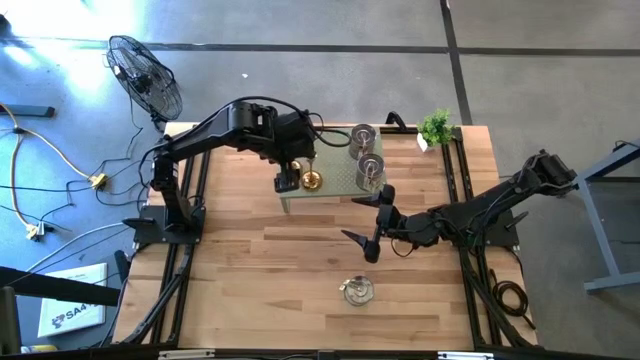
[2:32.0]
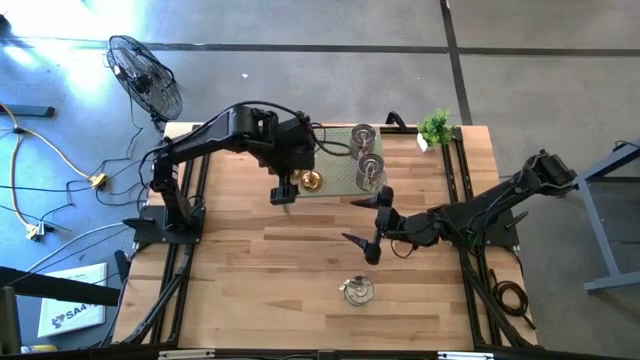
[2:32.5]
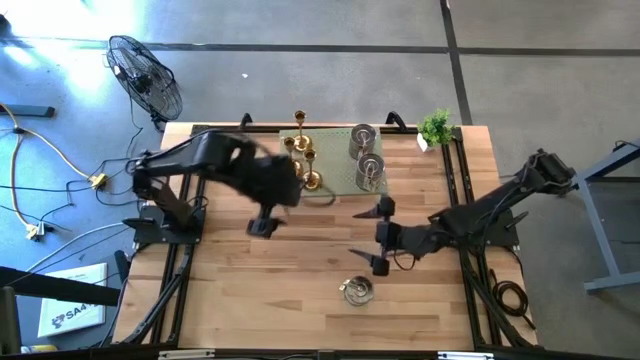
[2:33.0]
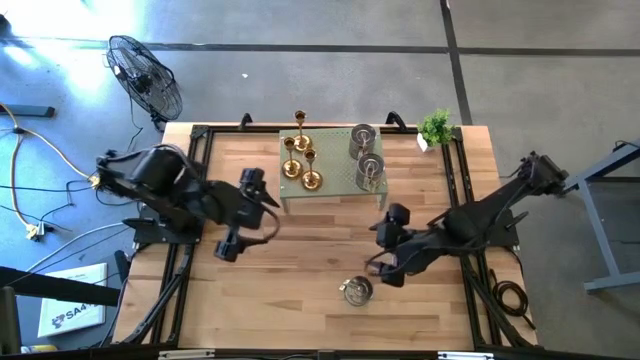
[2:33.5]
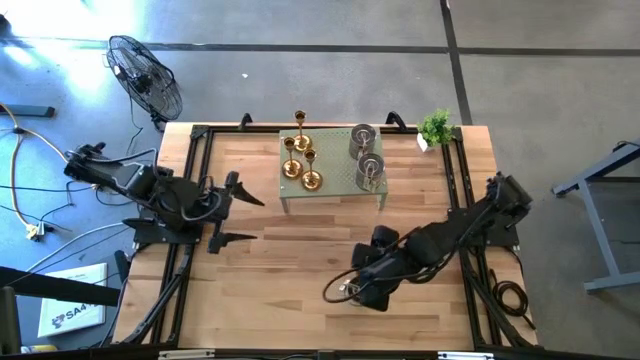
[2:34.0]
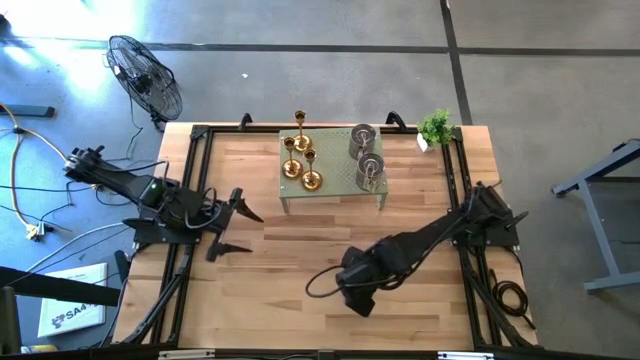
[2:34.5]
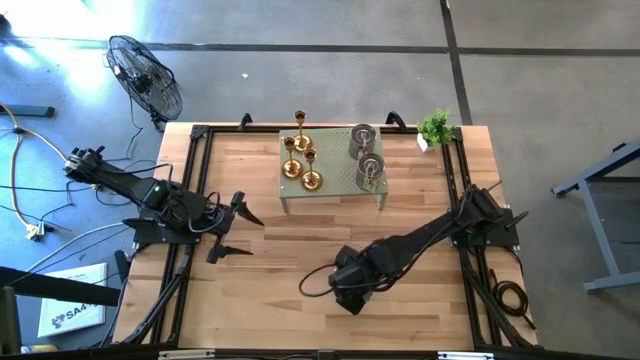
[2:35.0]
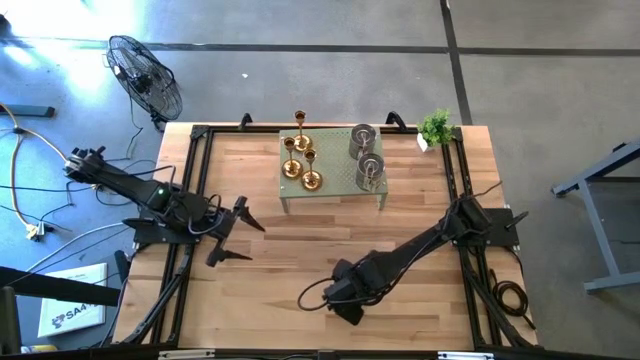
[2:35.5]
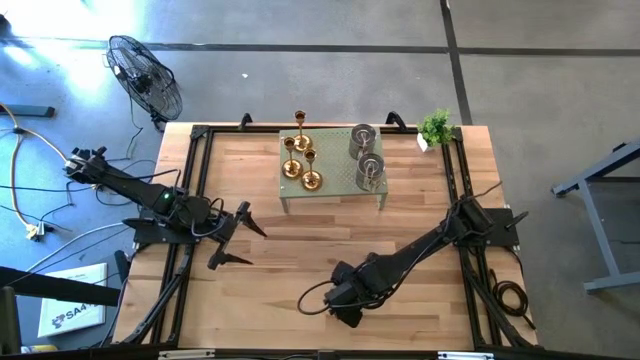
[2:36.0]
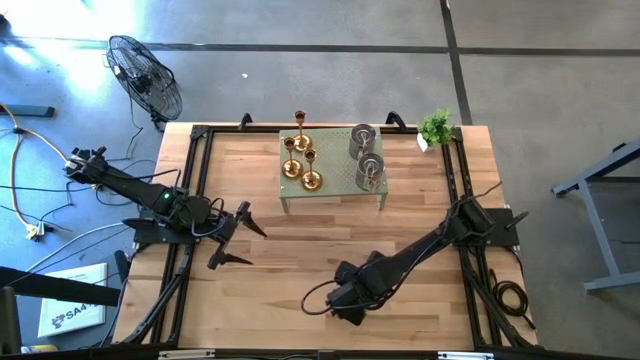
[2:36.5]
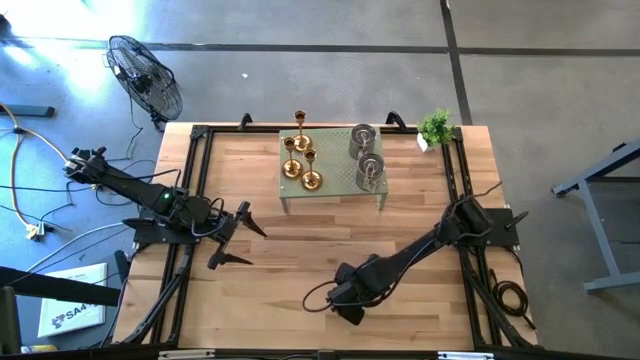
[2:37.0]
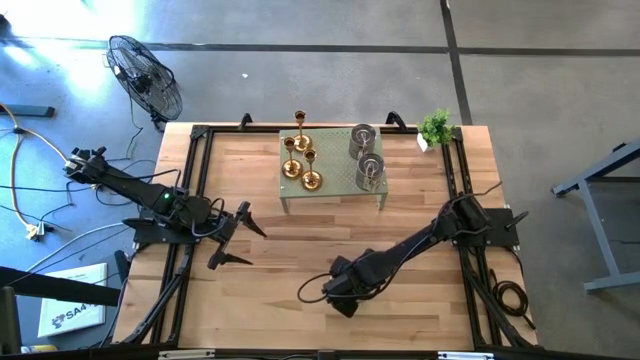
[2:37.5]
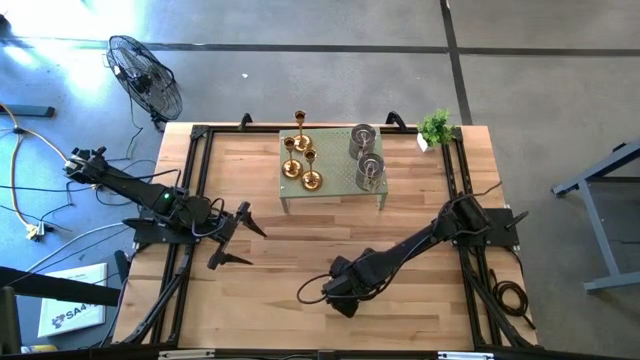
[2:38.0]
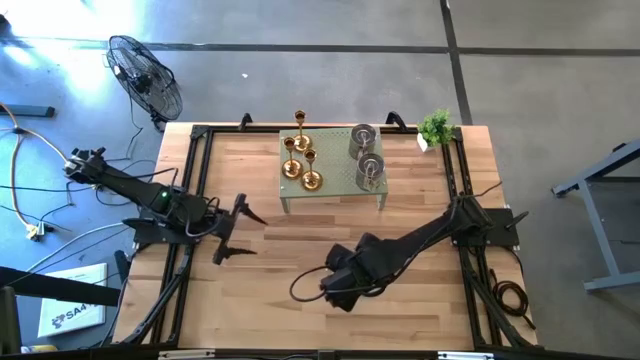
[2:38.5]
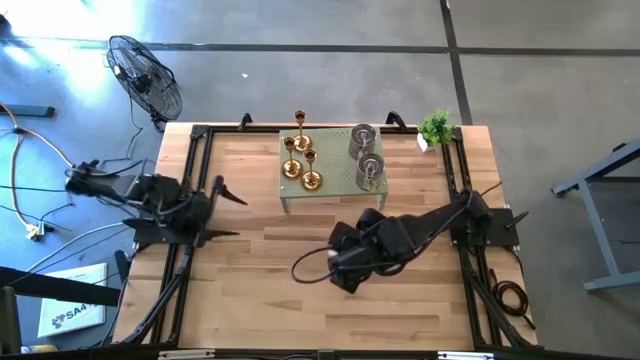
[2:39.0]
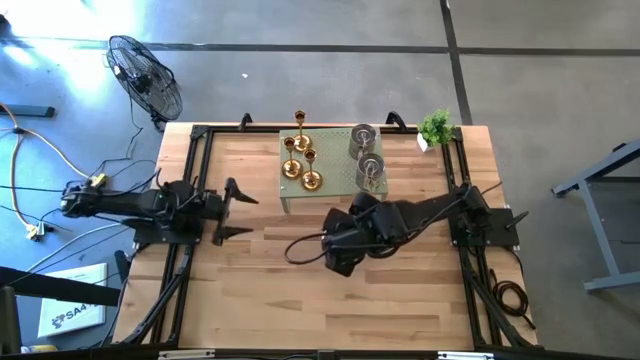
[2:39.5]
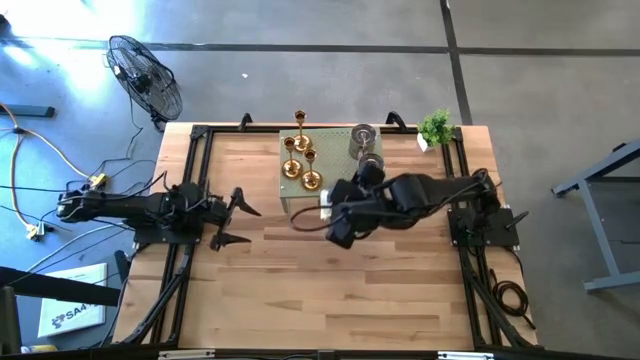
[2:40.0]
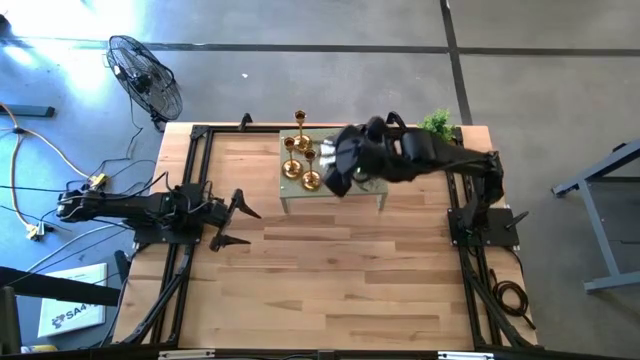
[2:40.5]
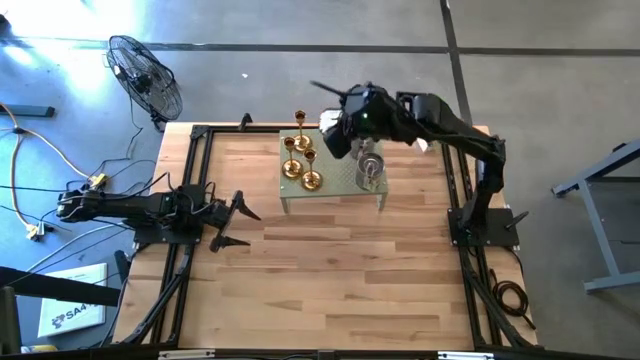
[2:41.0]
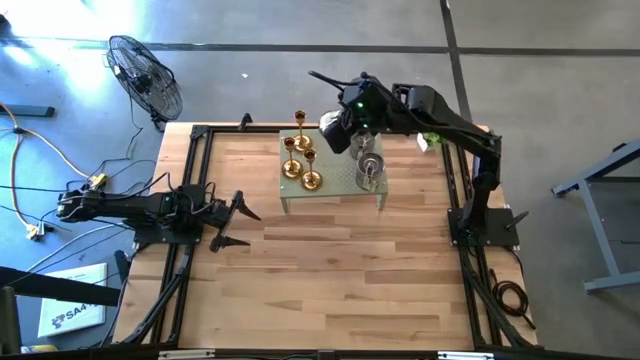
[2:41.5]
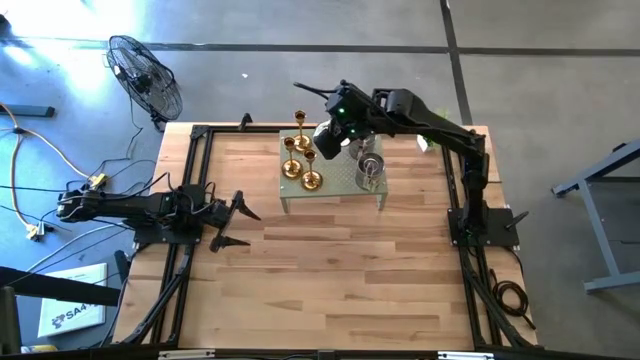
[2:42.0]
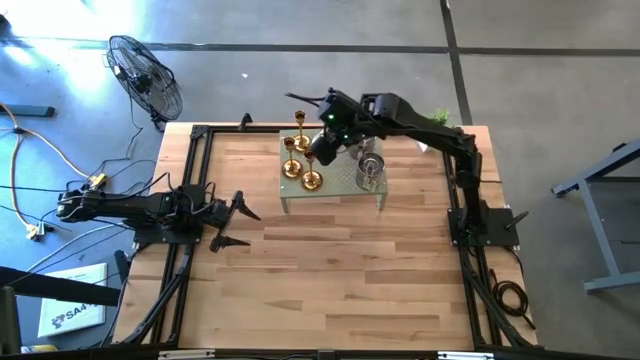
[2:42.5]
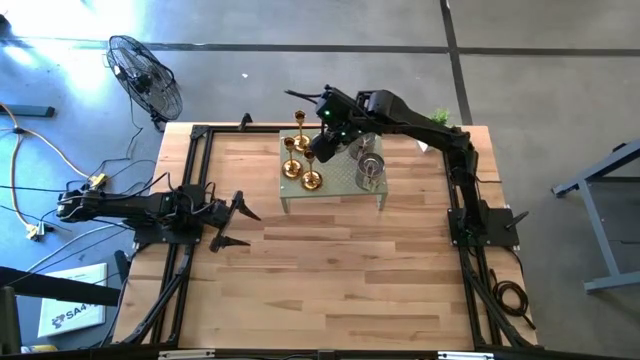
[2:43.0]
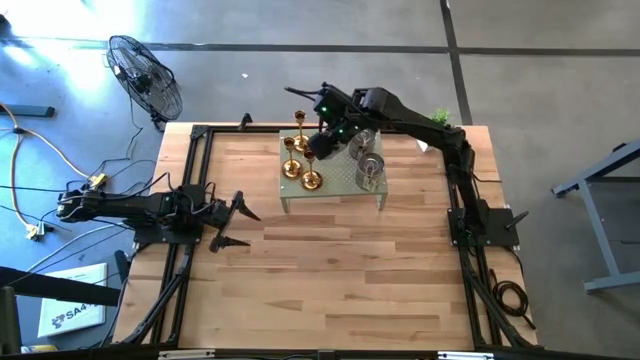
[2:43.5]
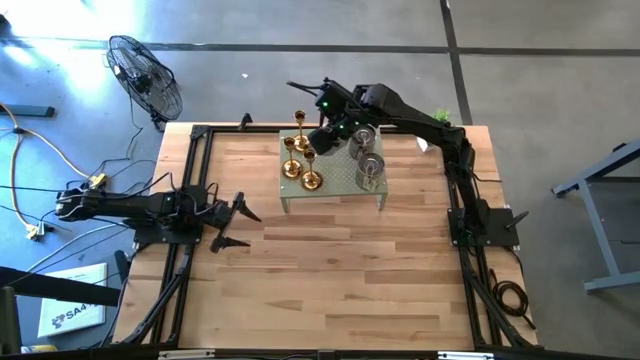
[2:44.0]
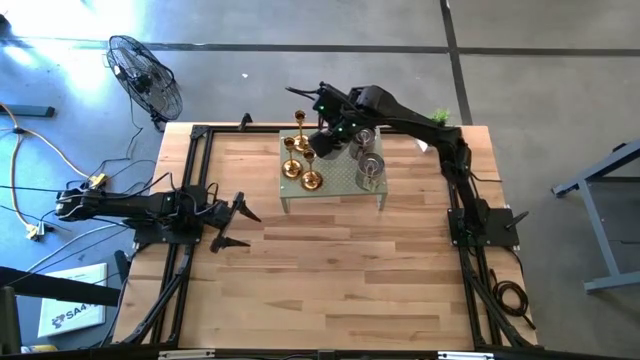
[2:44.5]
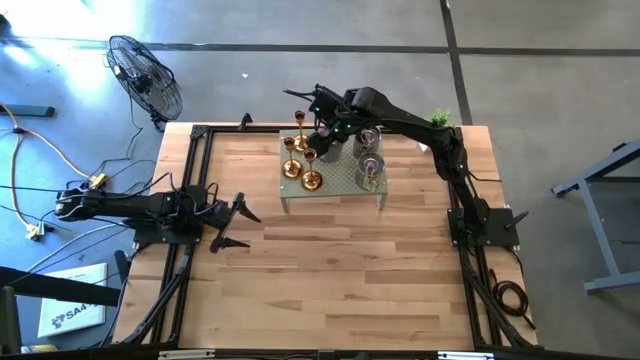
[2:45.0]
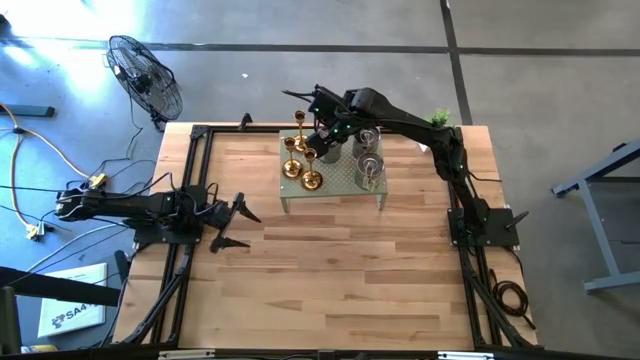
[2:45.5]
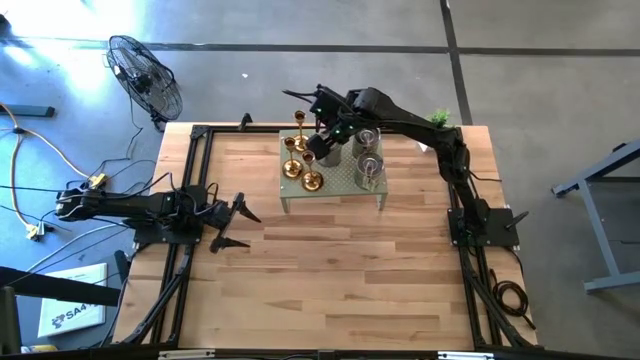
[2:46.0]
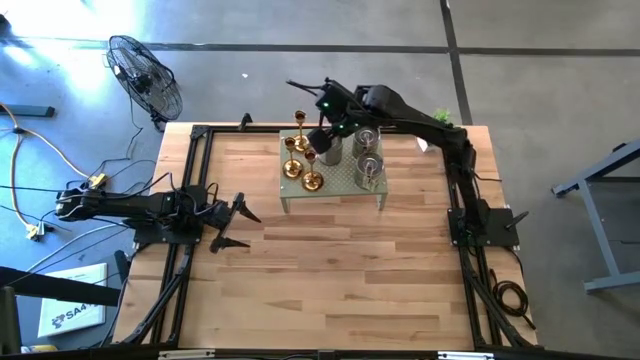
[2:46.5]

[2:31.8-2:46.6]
Task: Pick & Place candle stick holders
Put the silver scented candle on the shelf

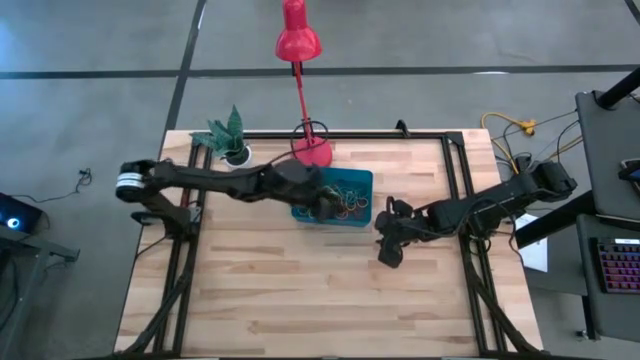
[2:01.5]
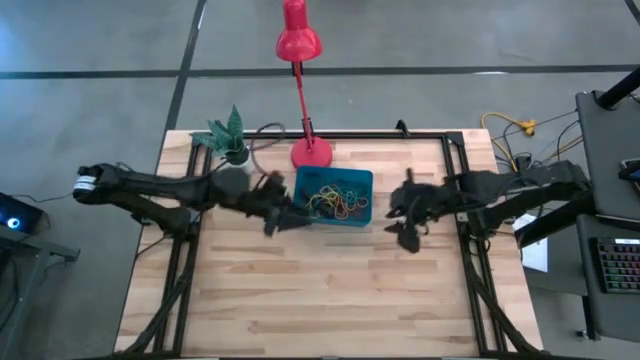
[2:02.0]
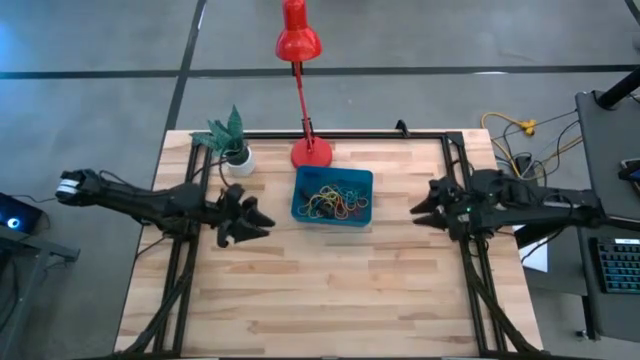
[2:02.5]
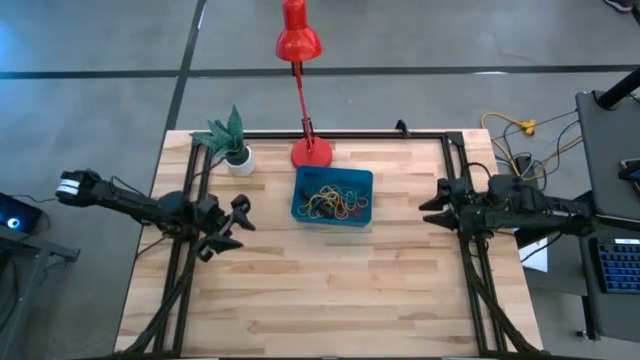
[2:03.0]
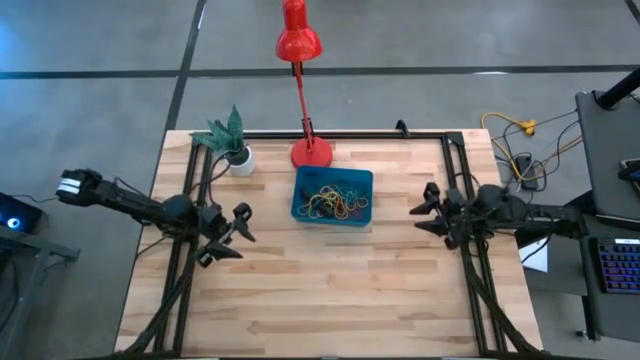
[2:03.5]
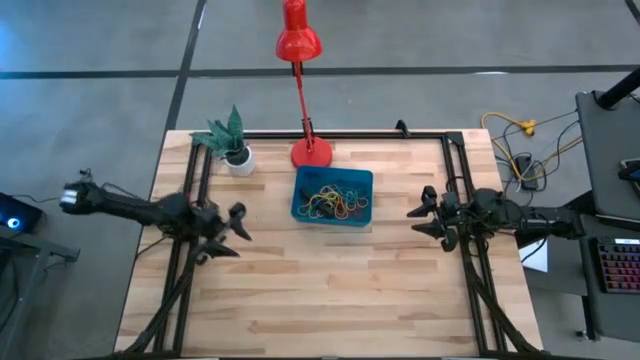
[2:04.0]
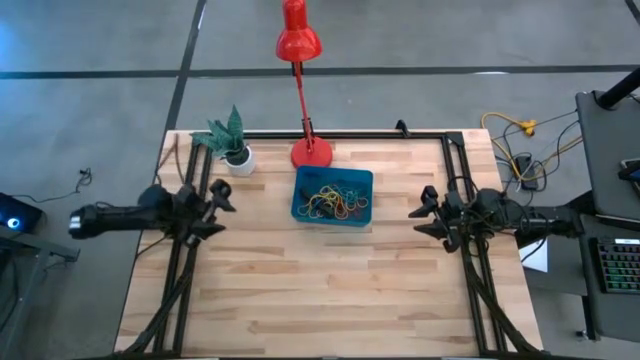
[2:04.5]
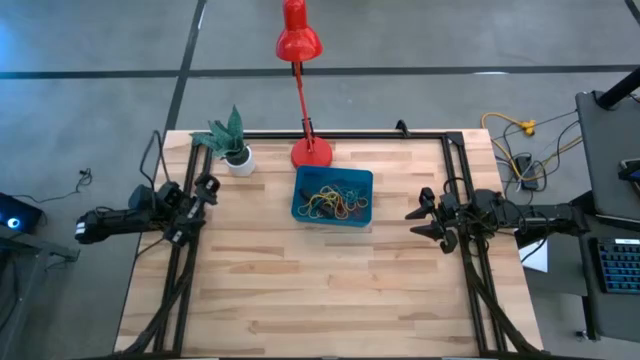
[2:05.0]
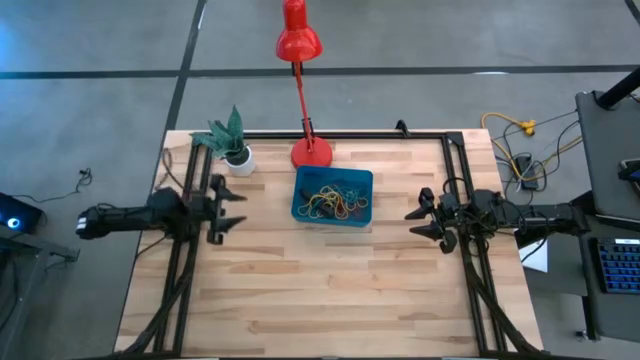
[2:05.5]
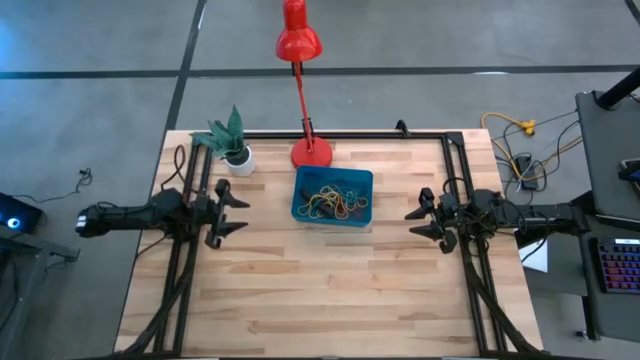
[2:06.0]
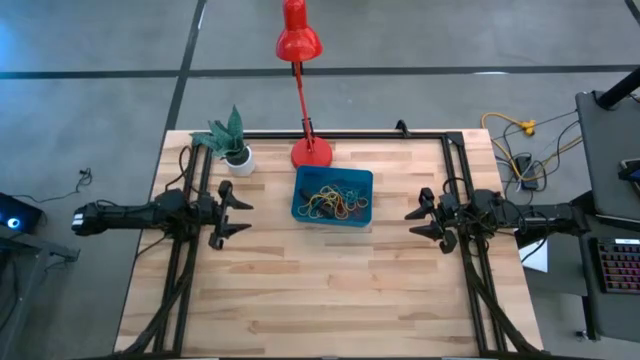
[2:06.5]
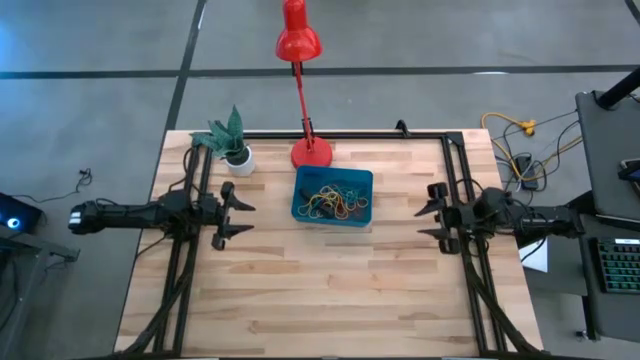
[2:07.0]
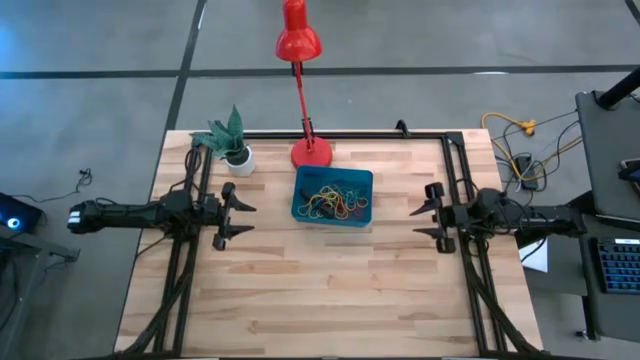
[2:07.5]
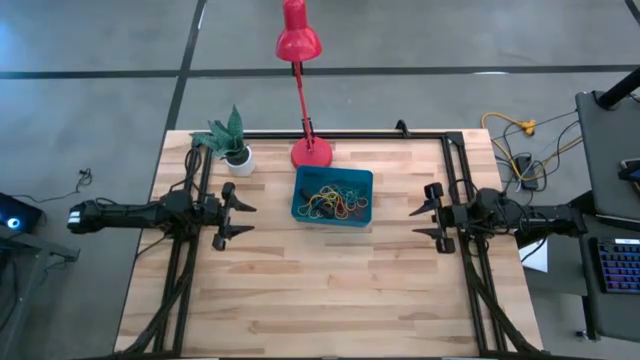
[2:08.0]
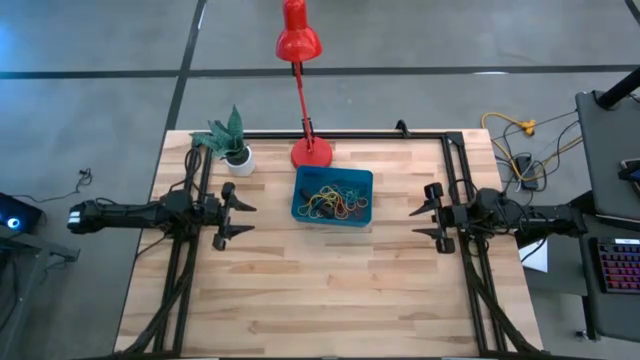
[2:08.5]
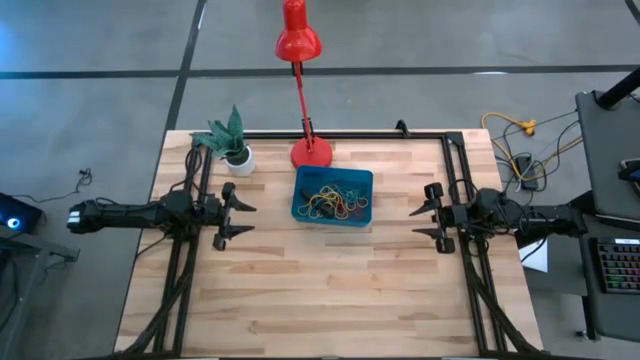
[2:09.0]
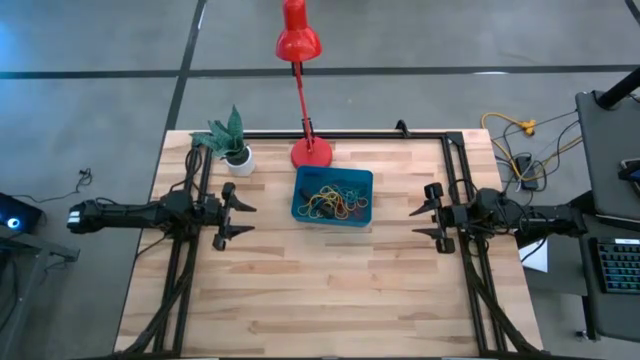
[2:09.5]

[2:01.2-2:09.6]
Task: Pick and place rubber bands into bin
Return to Home Position
